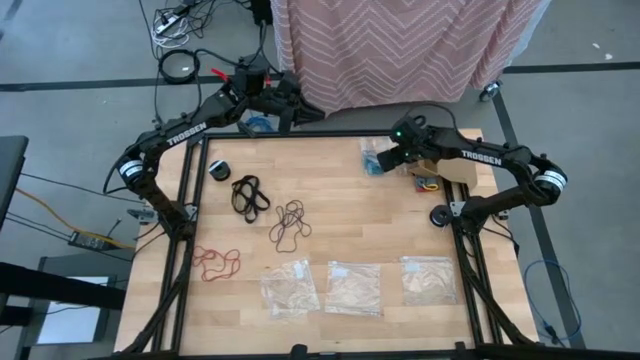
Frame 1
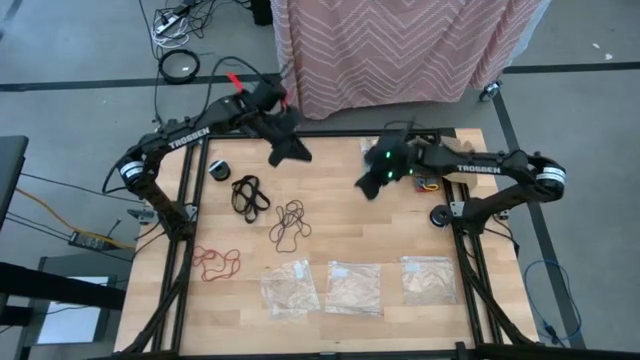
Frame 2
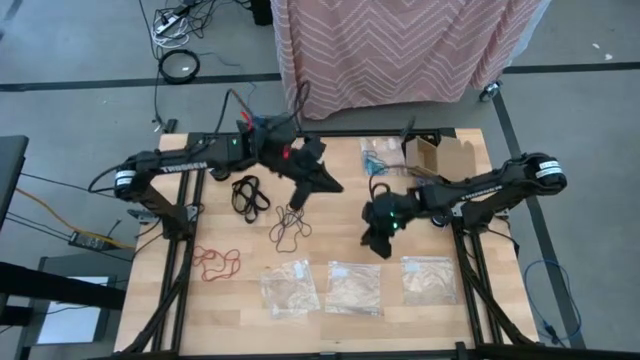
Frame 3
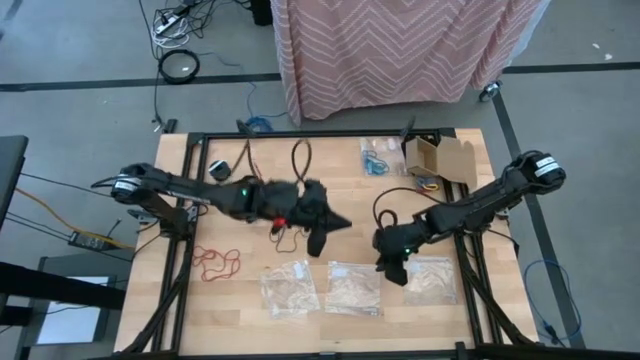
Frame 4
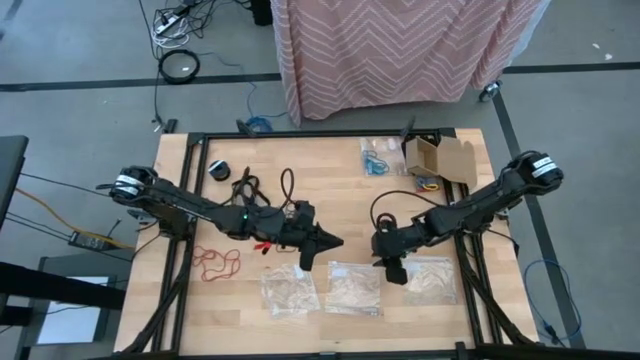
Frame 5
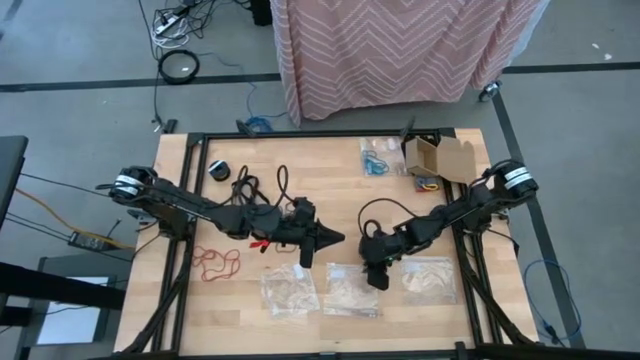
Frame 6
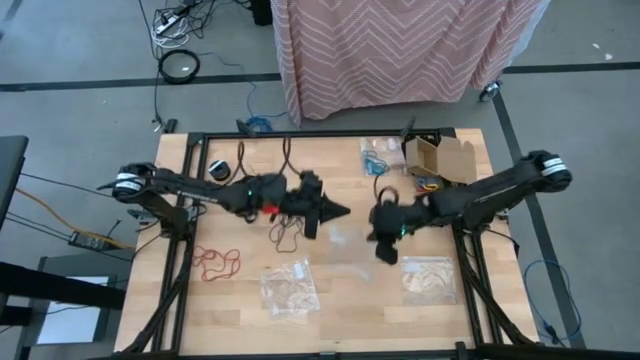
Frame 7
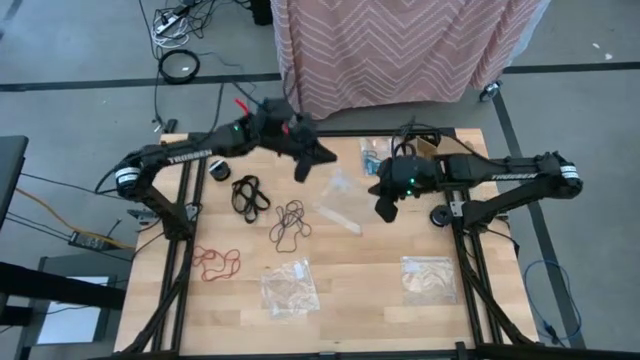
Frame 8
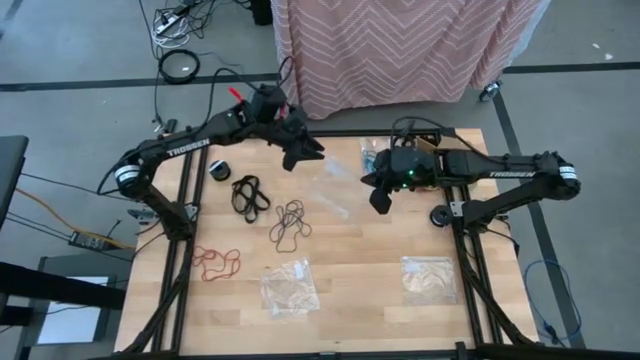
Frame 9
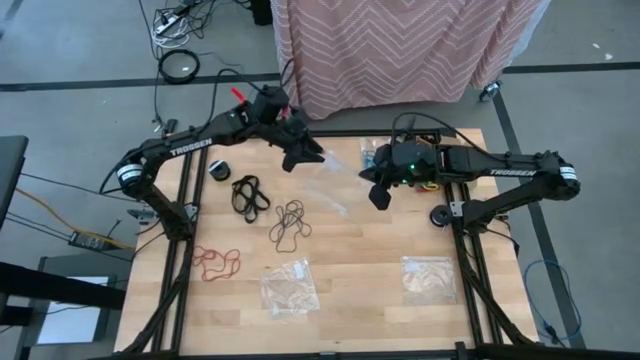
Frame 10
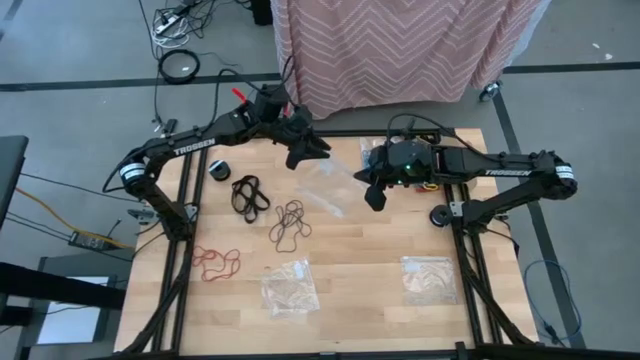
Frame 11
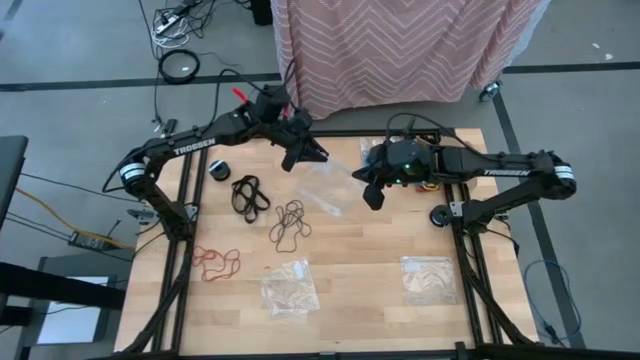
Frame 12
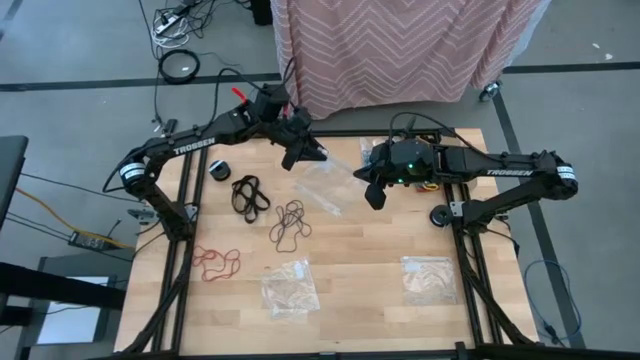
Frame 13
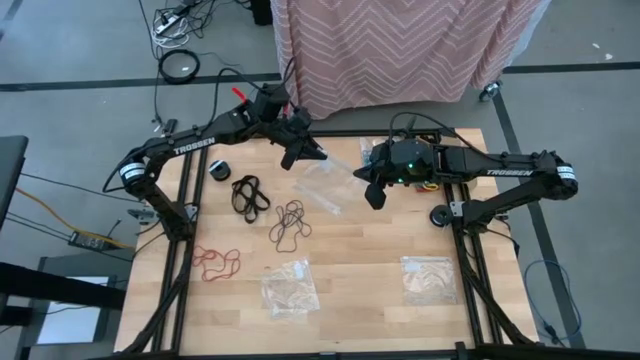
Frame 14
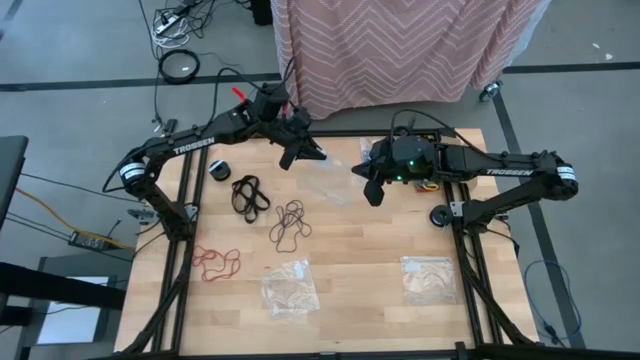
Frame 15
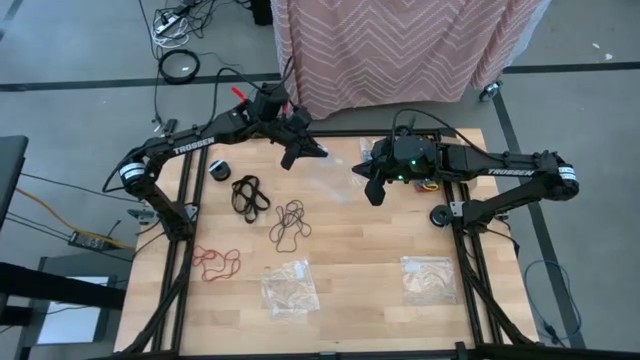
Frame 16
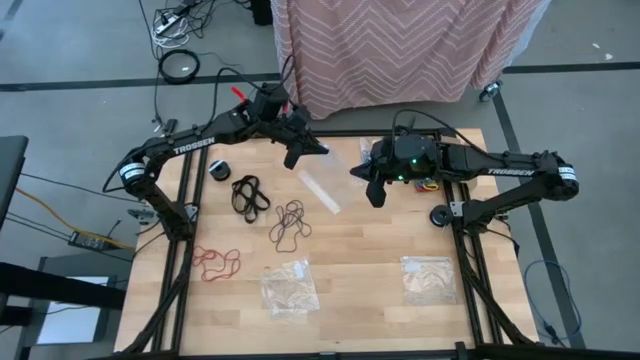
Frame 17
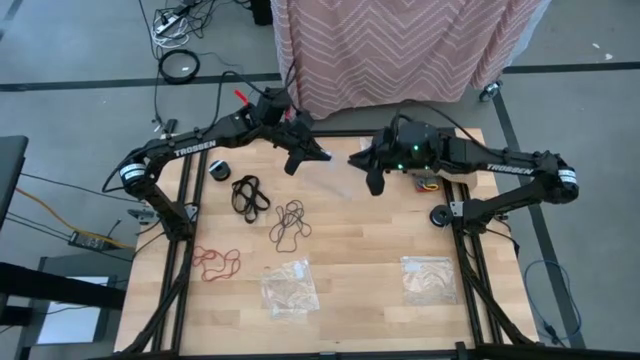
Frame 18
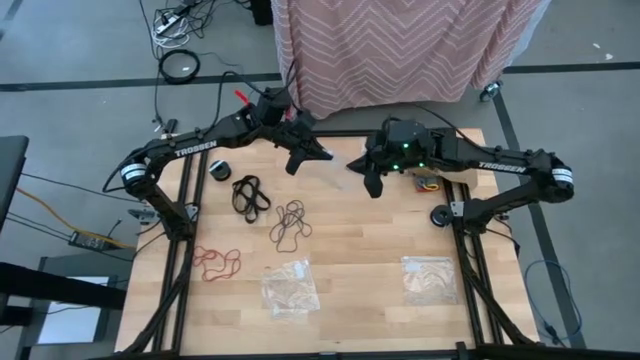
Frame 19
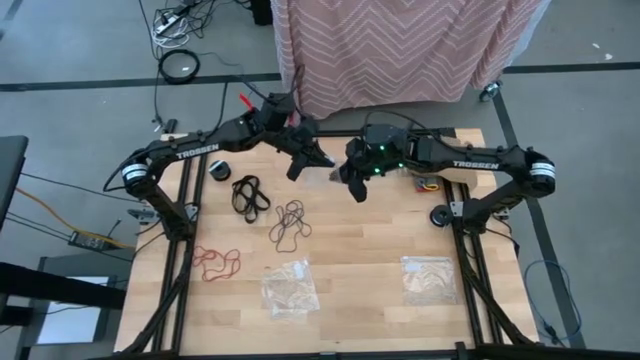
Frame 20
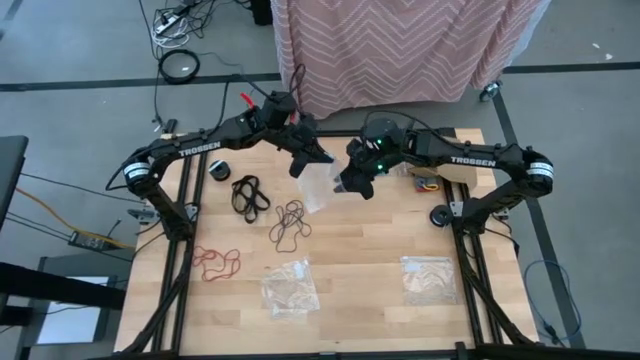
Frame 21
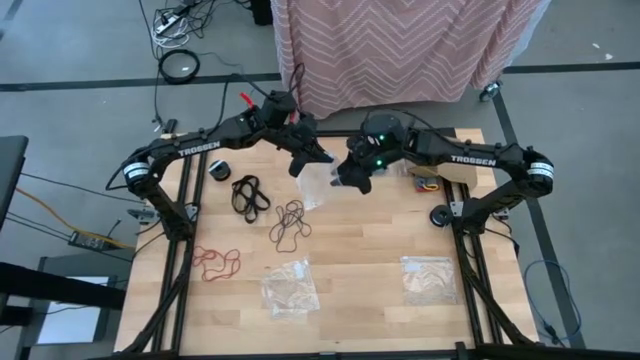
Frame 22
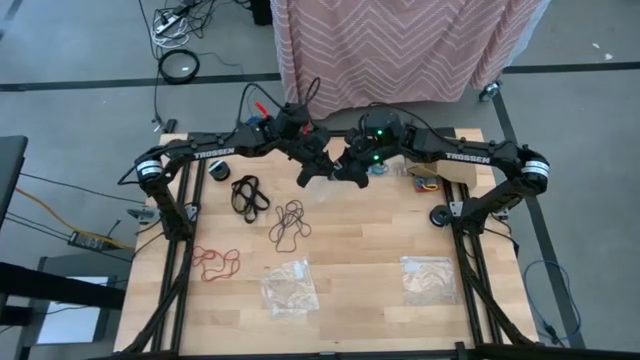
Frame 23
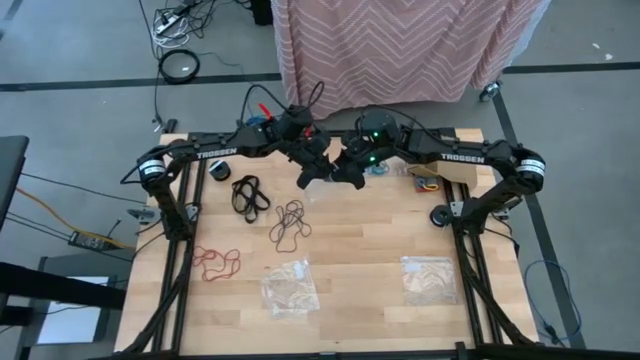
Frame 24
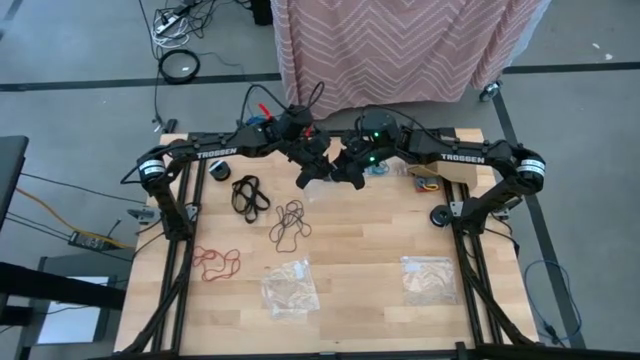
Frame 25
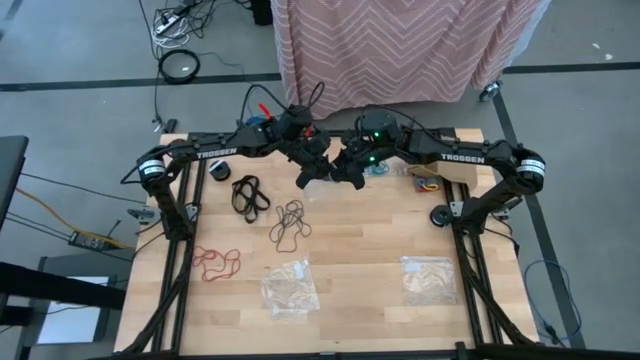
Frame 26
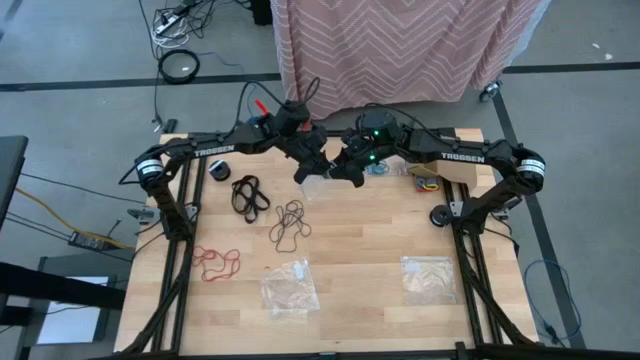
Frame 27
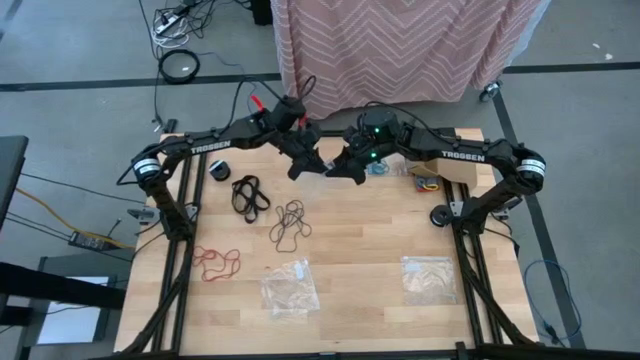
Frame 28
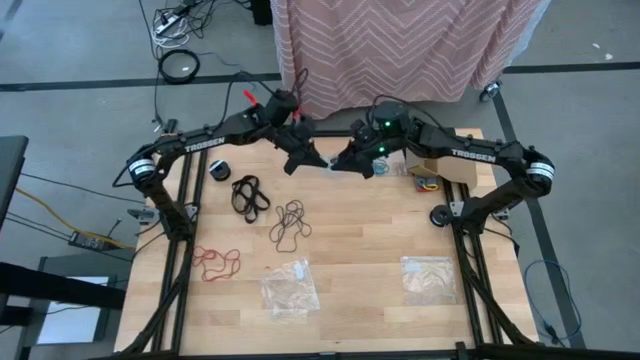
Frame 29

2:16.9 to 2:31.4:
Task: Sort rubber bands
Open the bottom center transparent zip bag

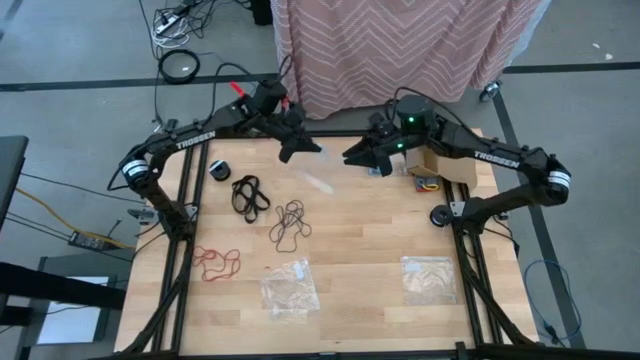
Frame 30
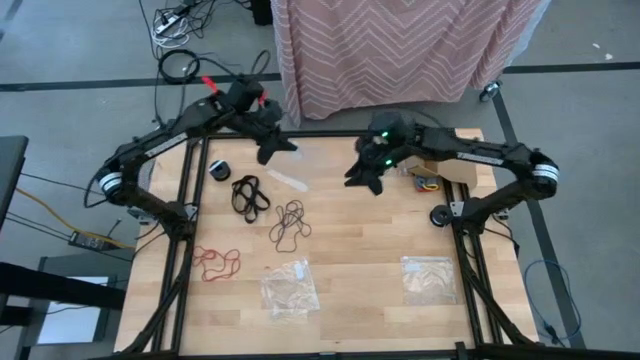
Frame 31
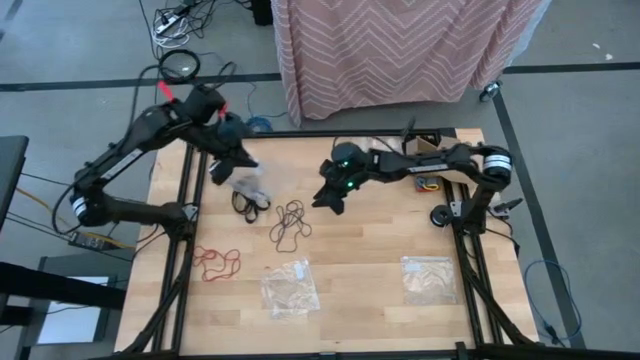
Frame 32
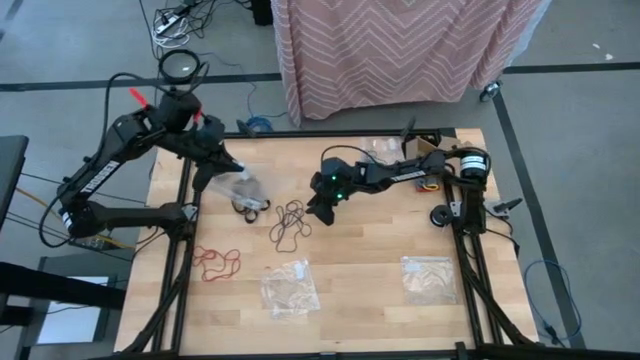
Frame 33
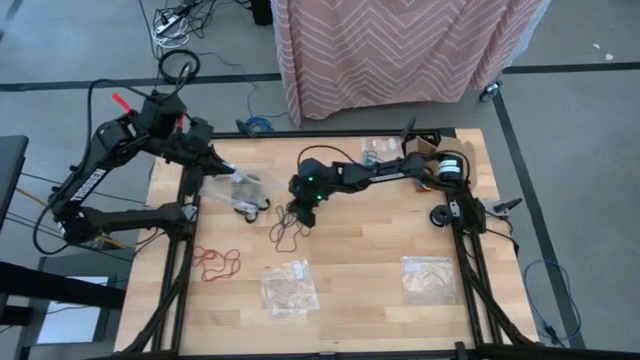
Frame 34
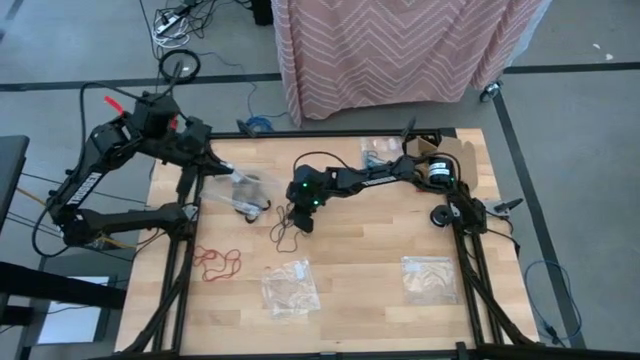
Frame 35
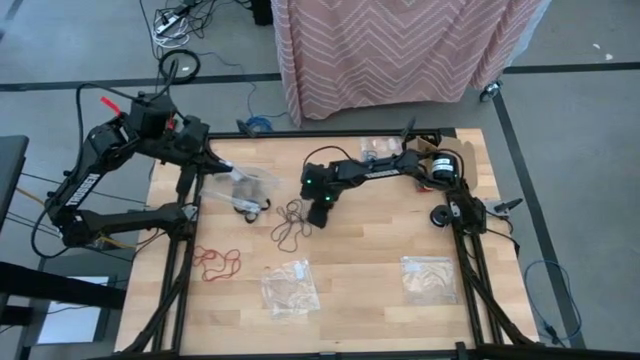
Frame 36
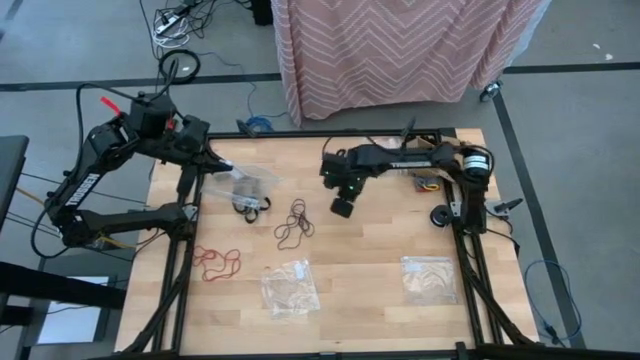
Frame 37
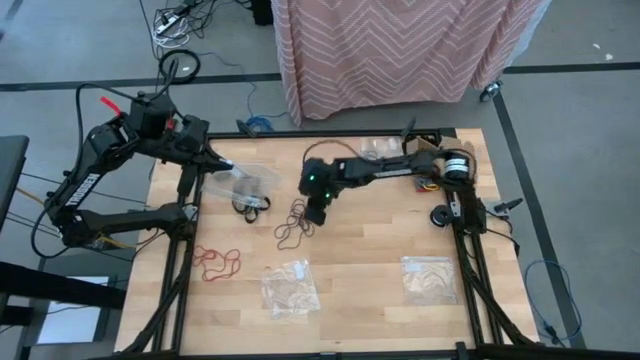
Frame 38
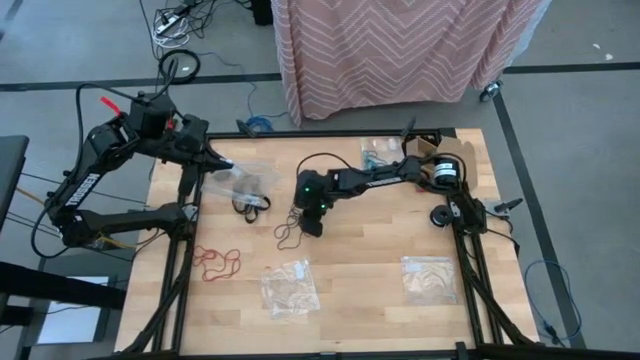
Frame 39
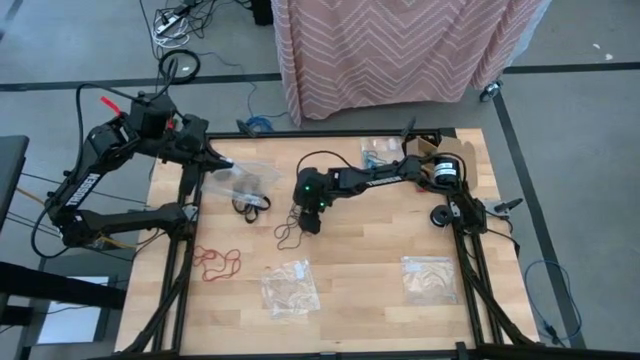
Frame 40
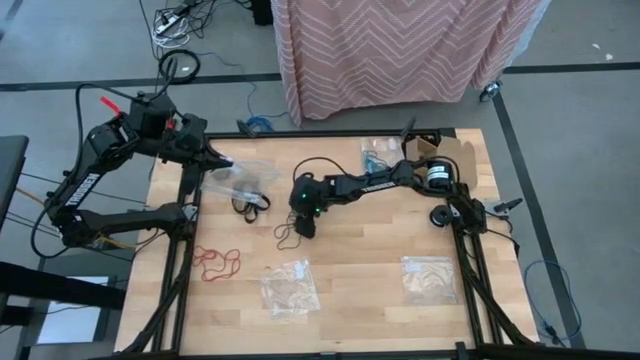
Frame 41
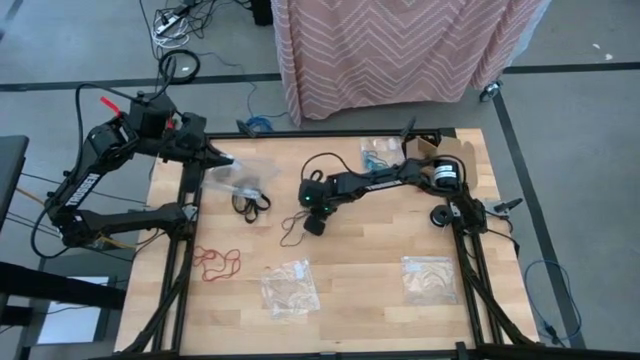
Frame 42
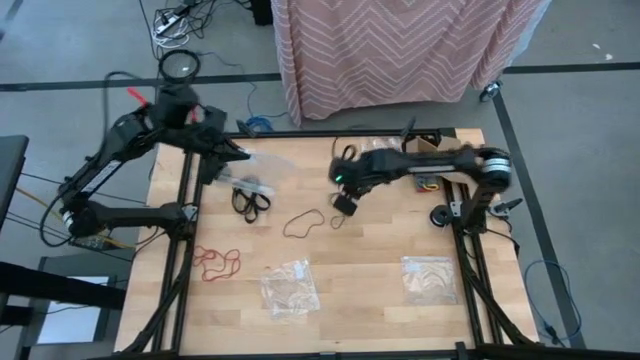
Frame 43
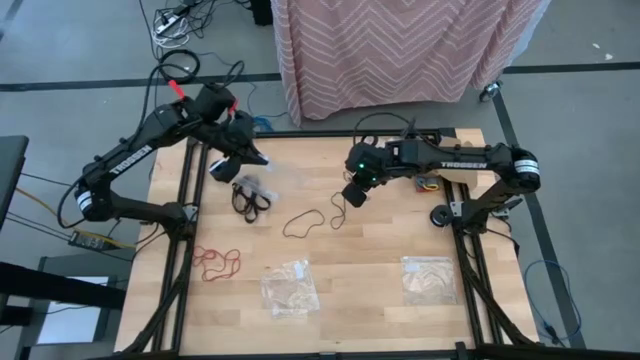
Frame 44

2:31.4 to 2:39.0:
Put the black rubber band into the bottom center transparent zip bag
